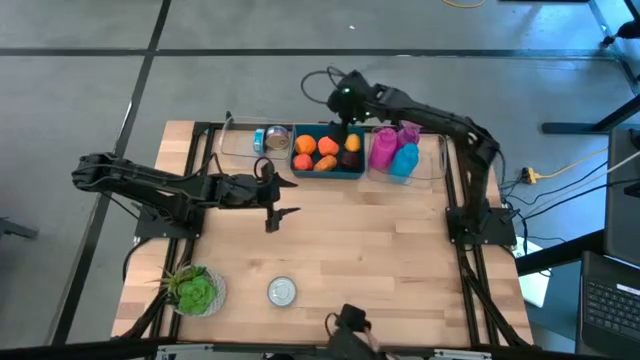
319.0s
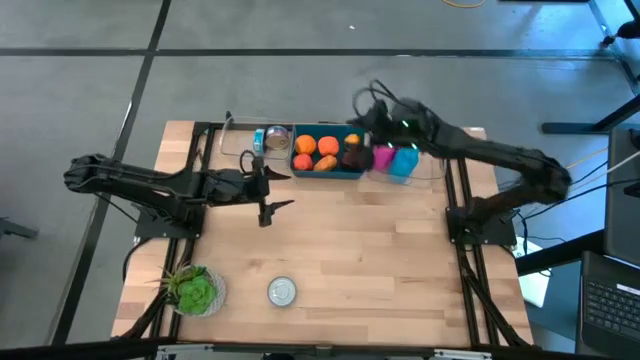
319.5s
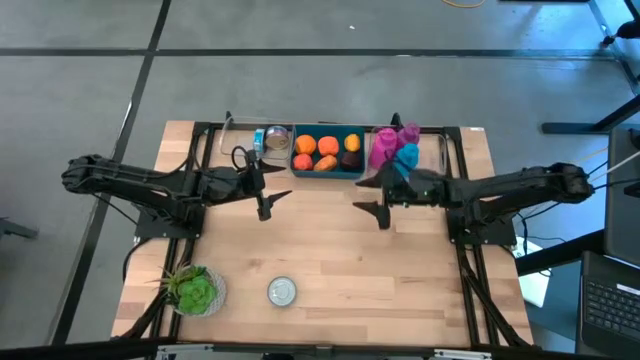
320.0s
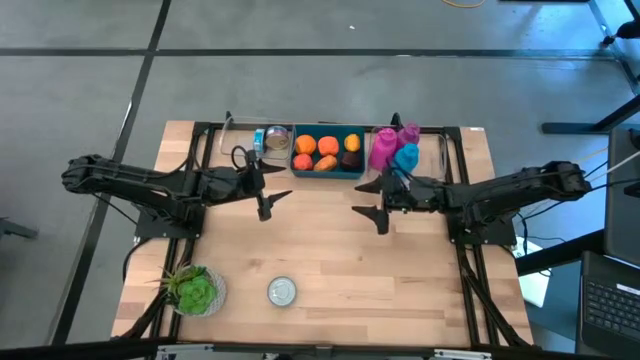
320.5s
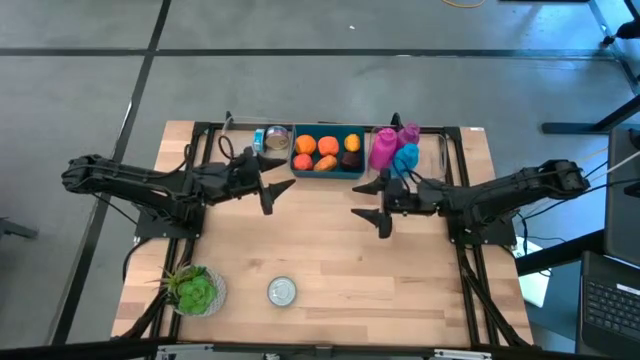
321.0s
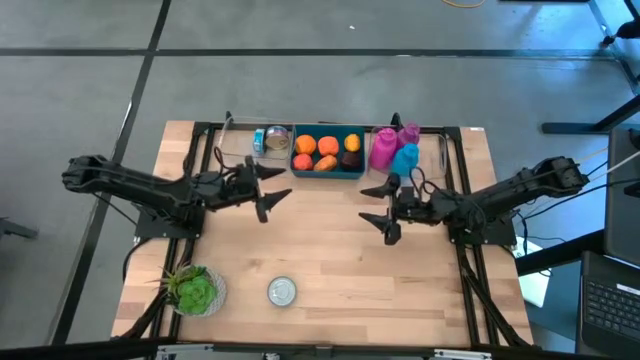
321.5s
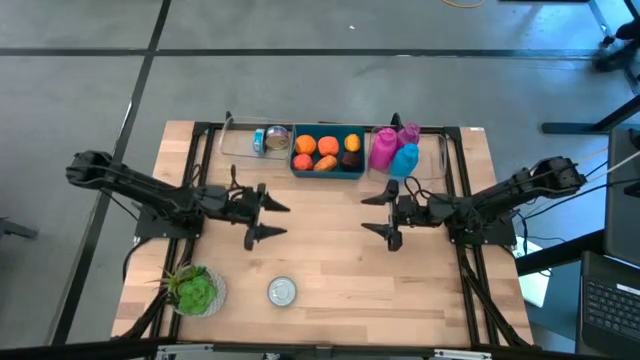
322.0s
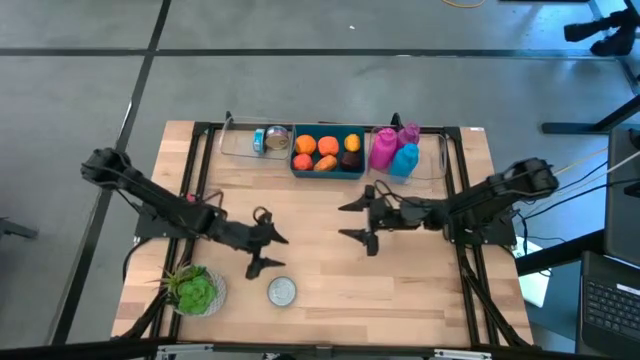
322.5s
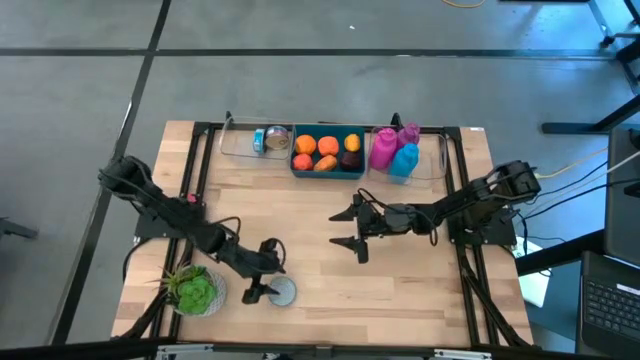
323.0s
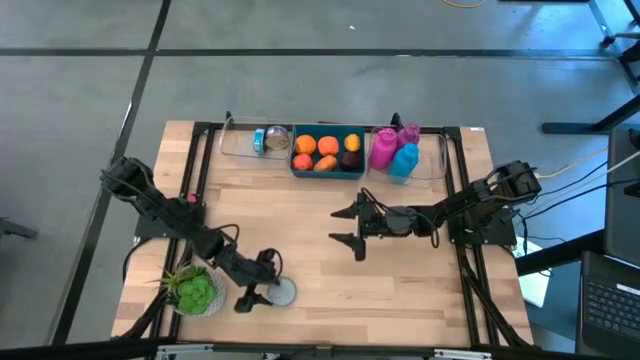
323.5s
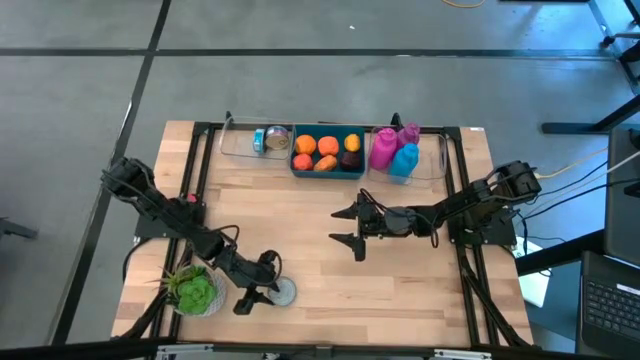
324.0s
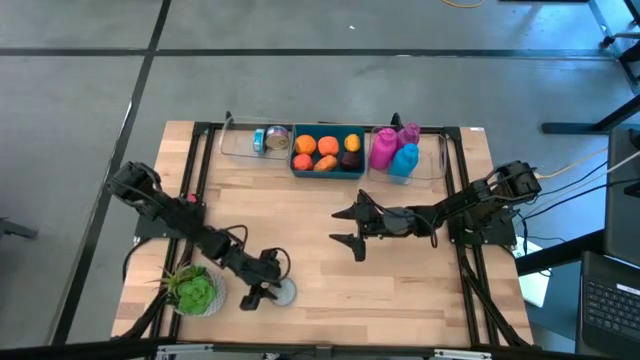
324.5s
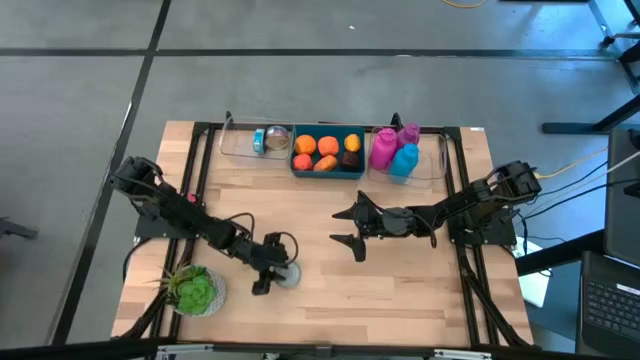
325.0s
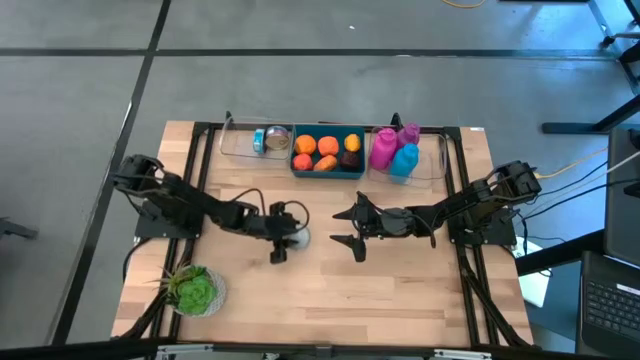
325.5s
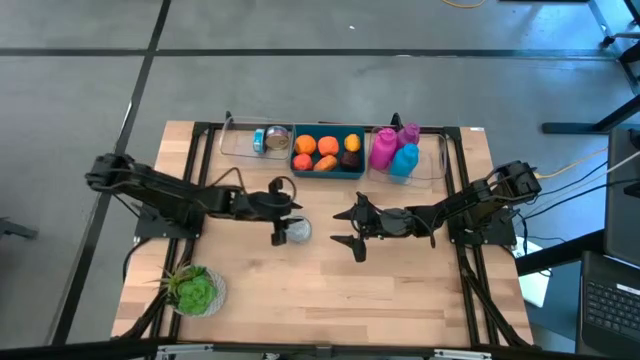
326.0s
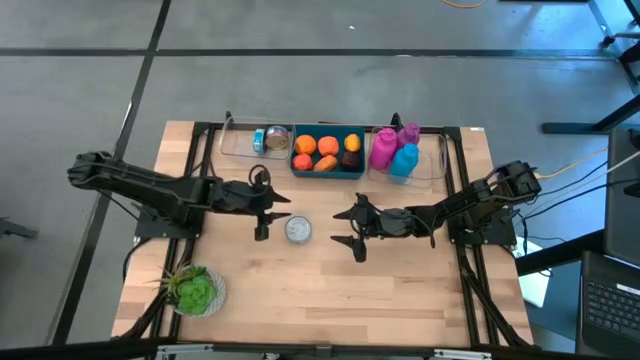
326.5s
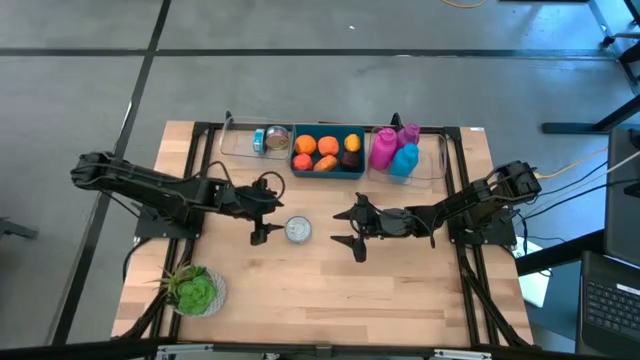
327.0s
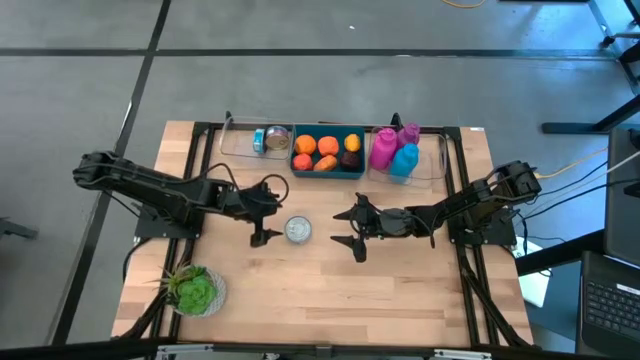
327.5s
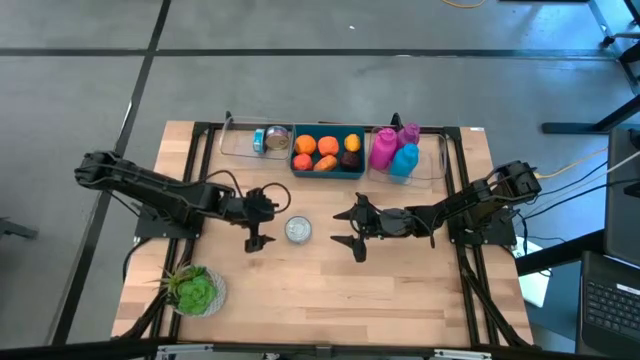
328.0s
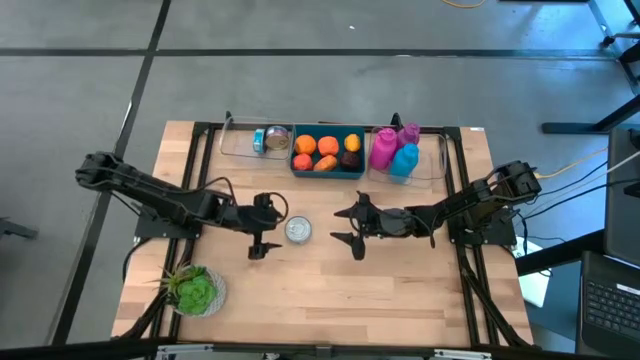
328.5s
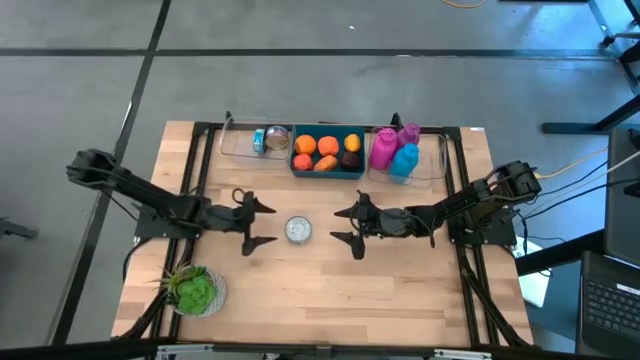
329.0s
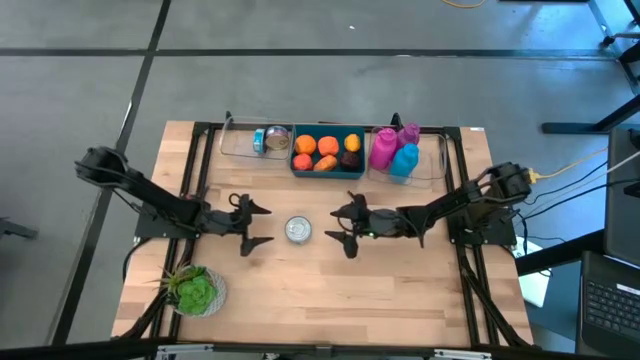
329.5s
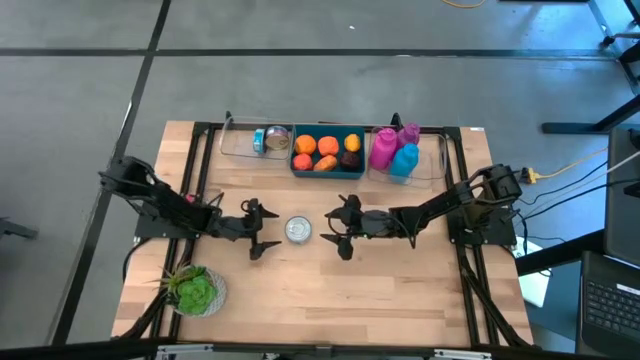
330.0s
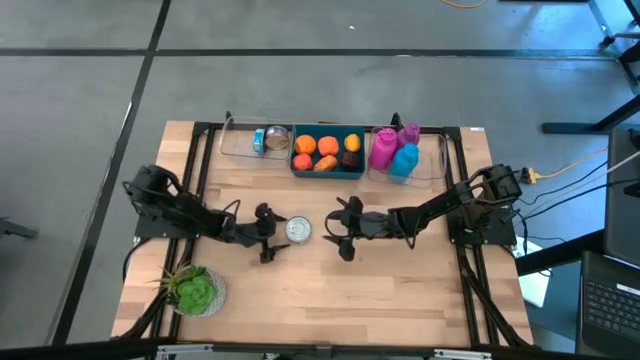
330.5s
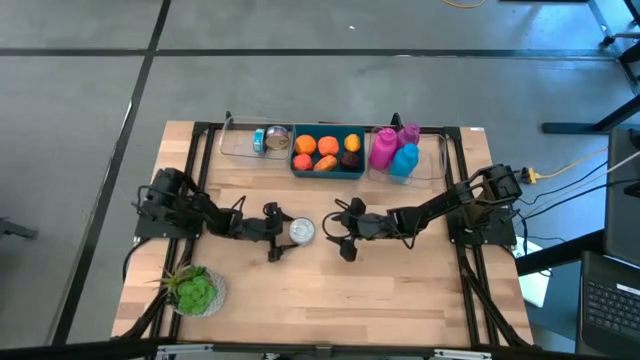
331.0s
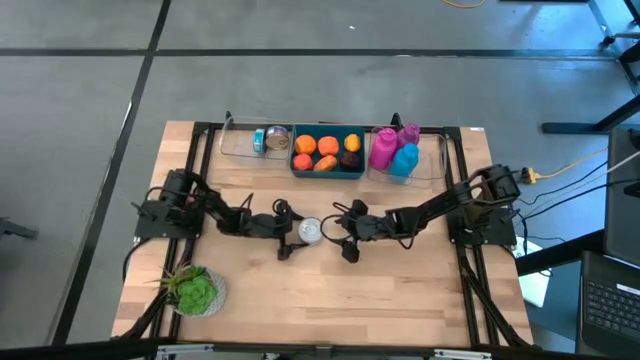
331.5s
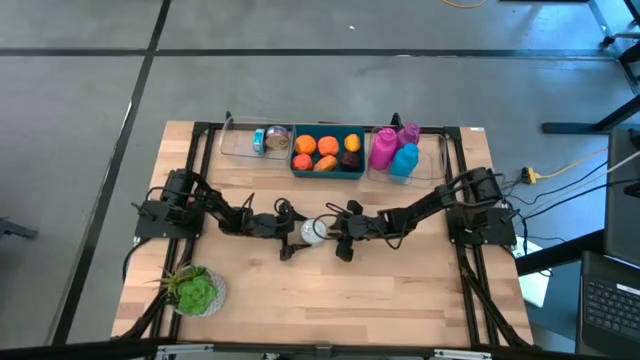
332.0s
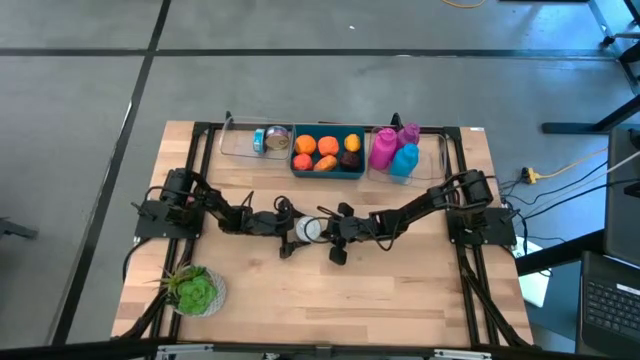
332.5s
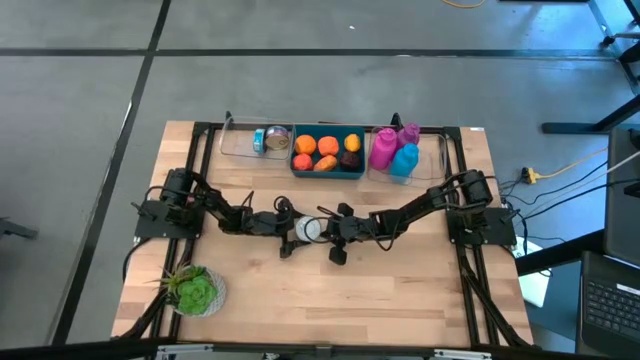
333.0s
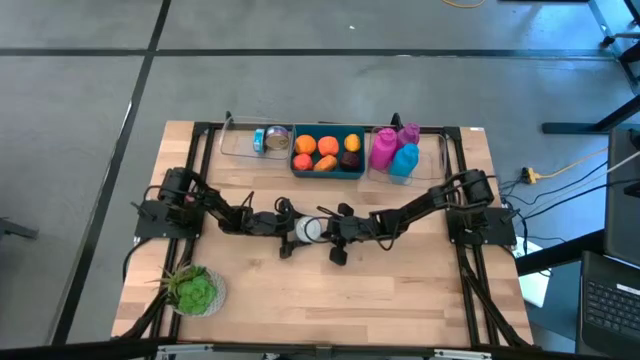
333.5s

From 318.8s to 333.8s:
Task: Pick & Place Food Item
Put the blue tuna can into the left transparent bin

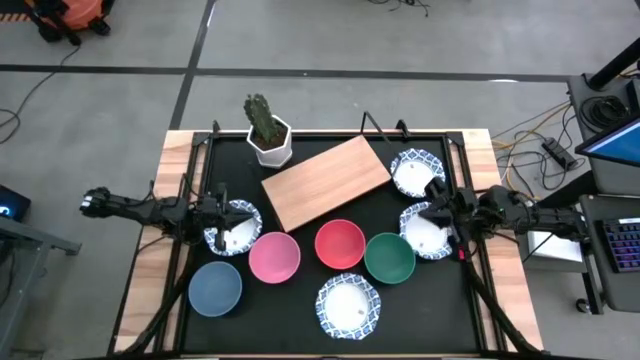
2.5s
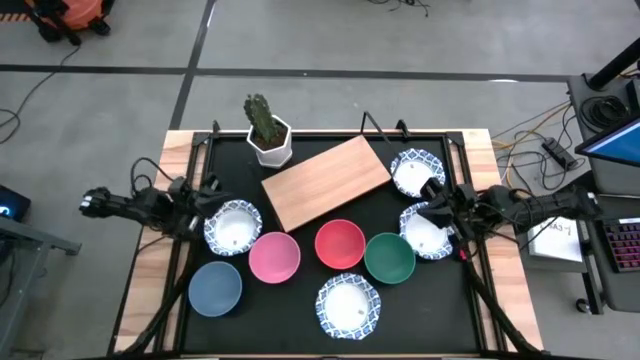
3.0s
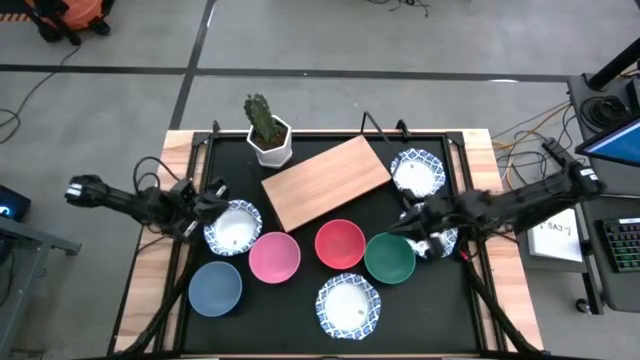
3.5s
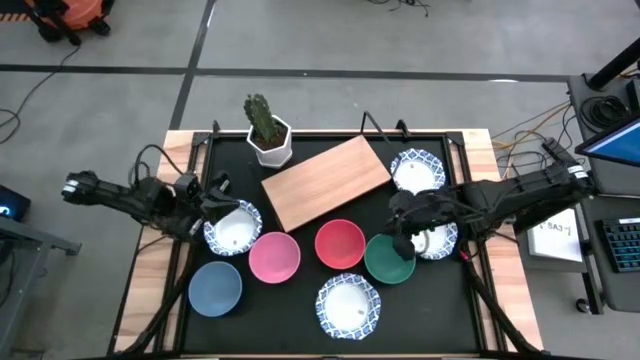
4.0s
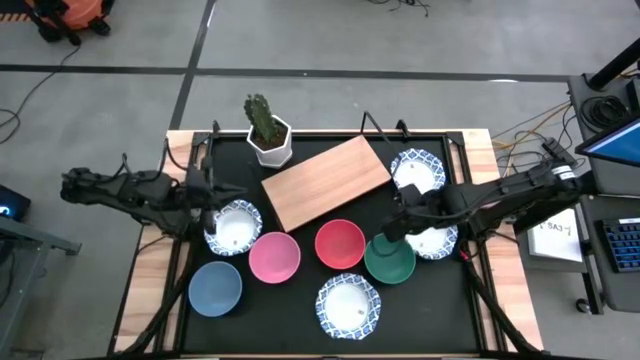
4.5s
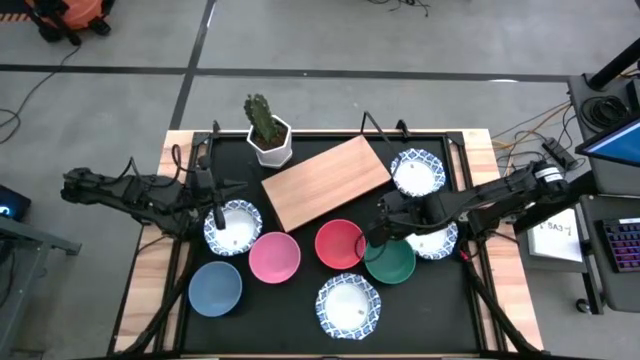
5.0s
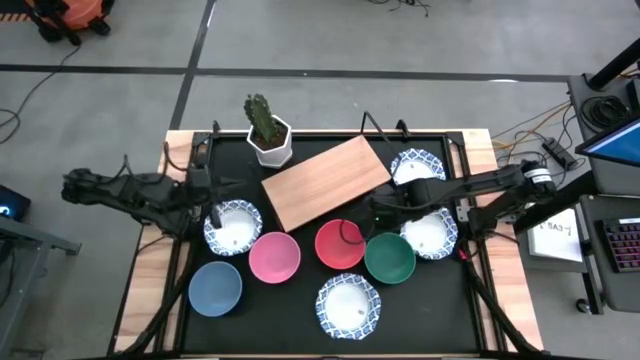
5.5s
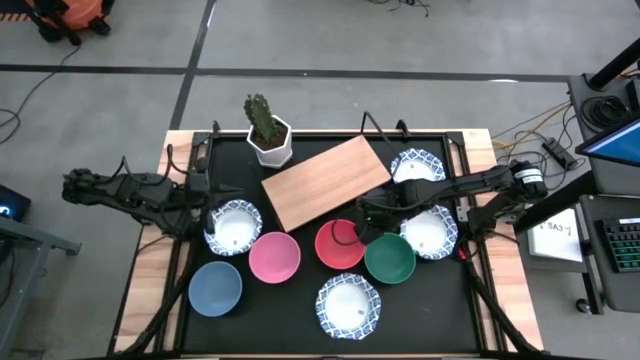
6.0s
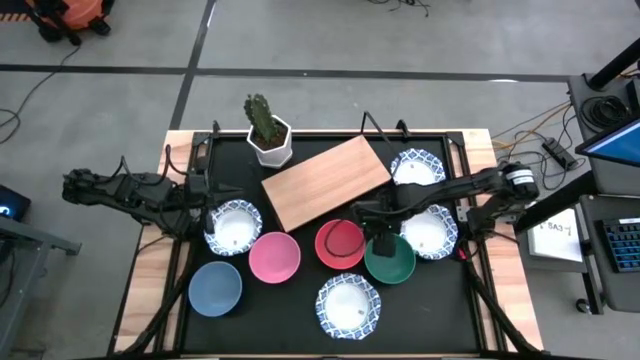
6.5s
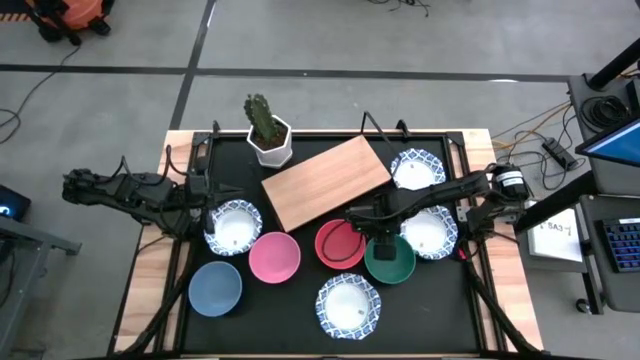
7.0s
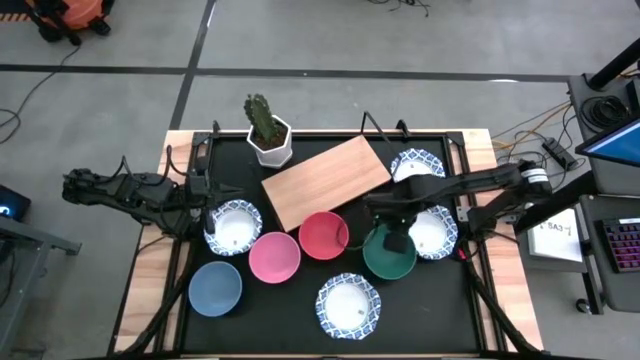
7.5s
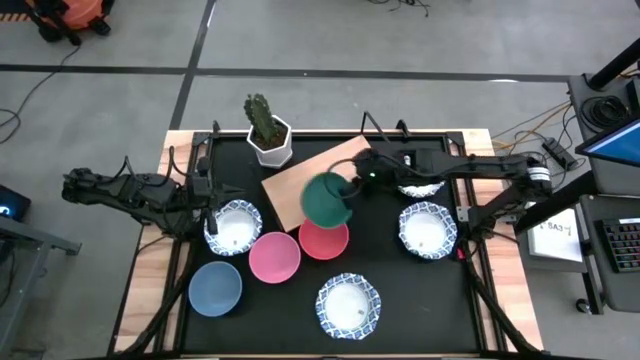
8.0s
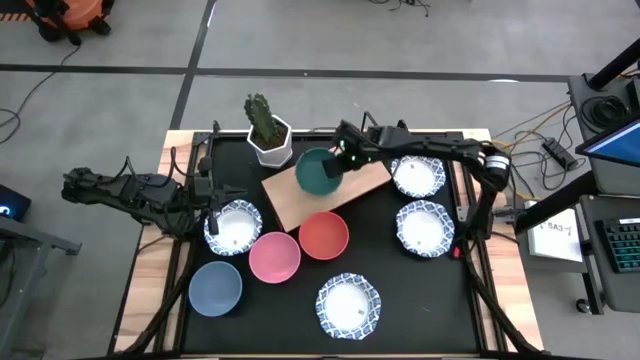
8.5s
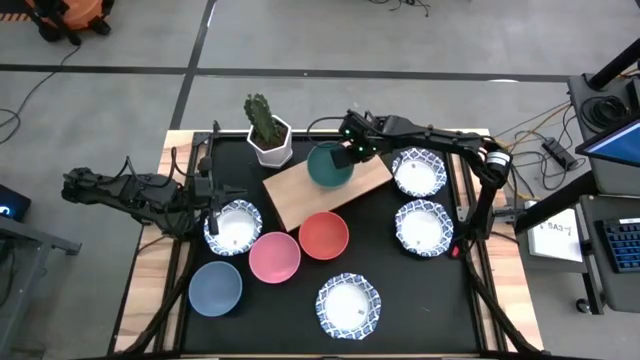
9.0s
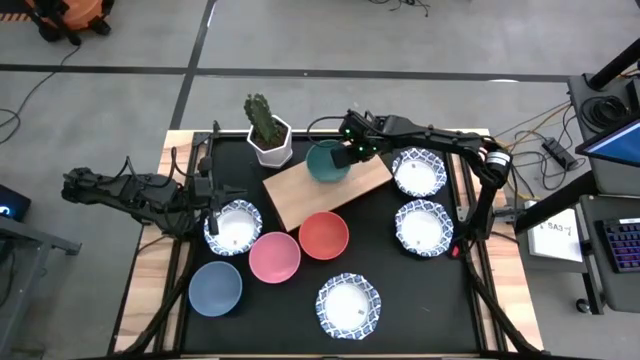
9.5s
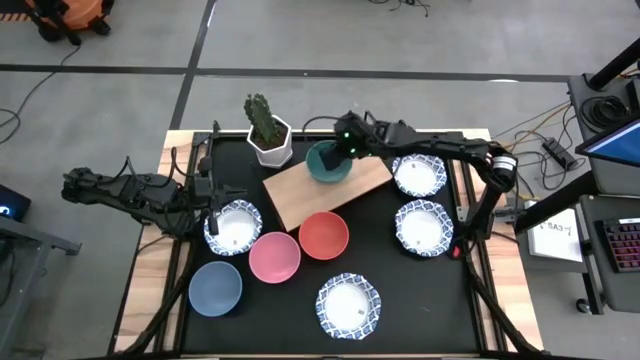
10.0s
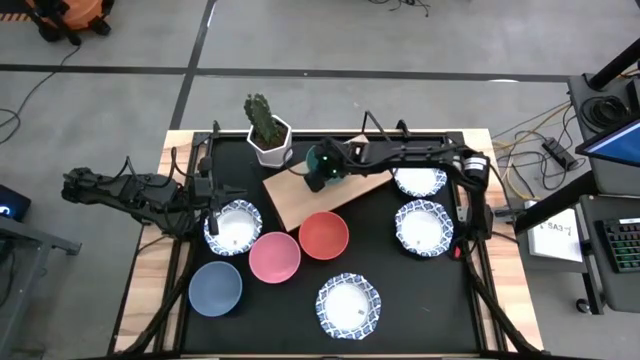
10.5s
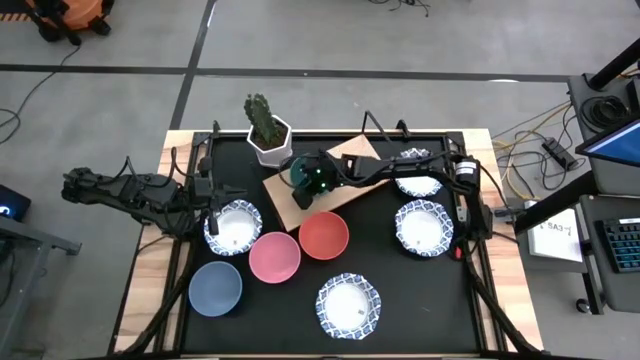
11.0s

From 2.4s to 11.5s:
Task: Place and stack bowls onto a shelf
Put the green bowl on the shelf
